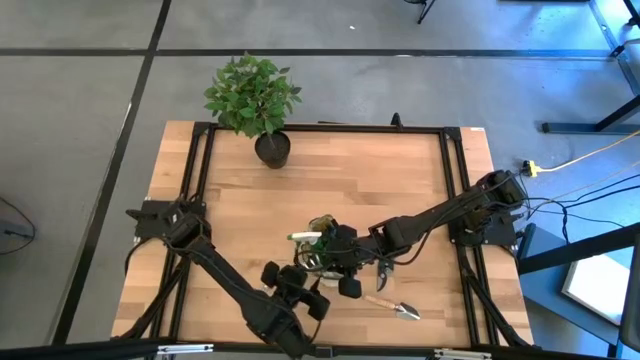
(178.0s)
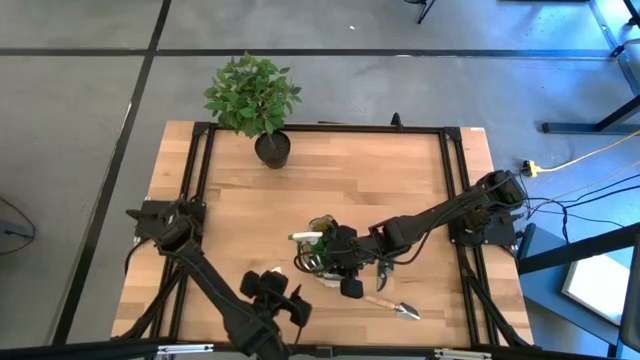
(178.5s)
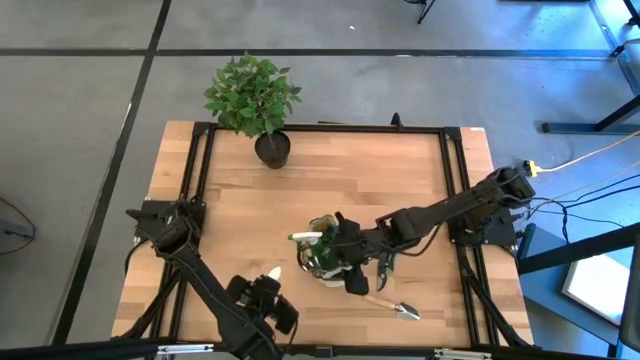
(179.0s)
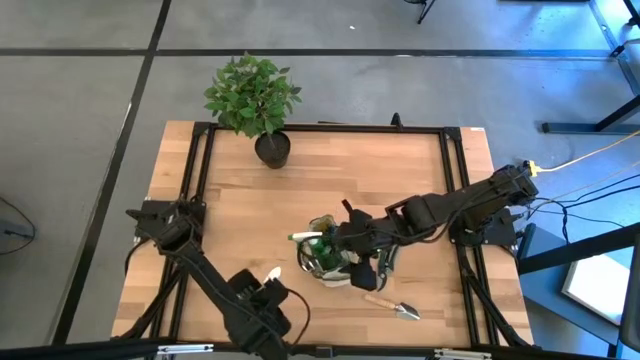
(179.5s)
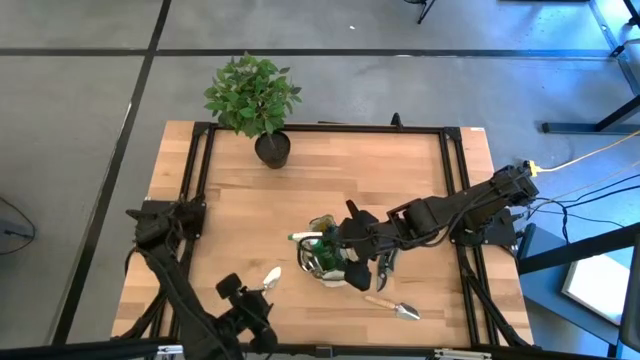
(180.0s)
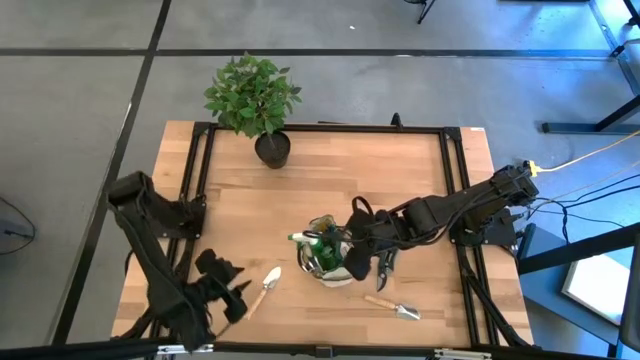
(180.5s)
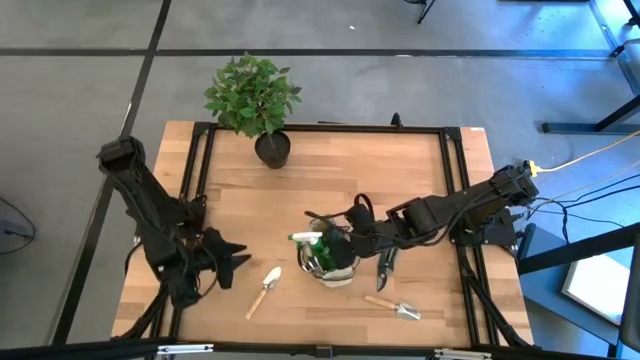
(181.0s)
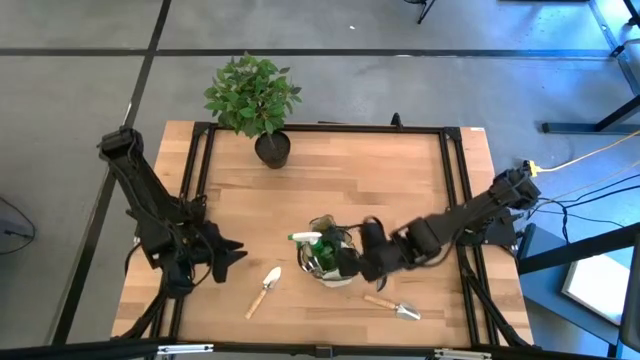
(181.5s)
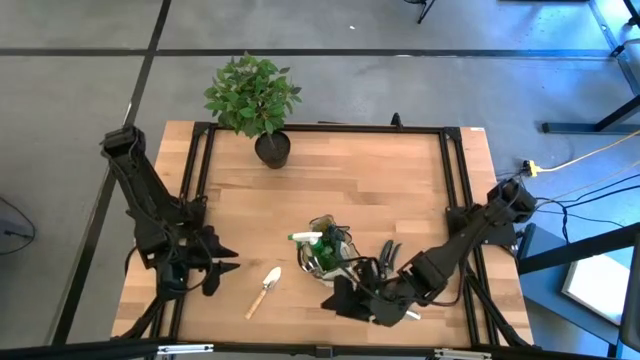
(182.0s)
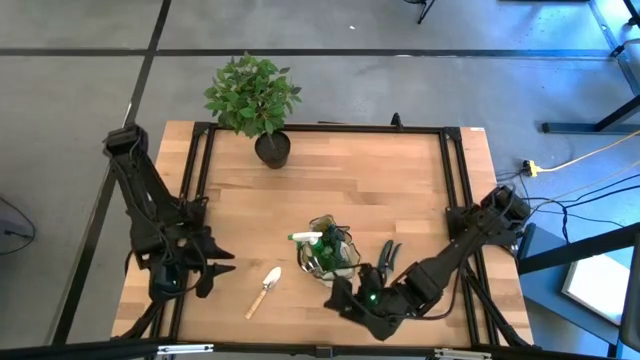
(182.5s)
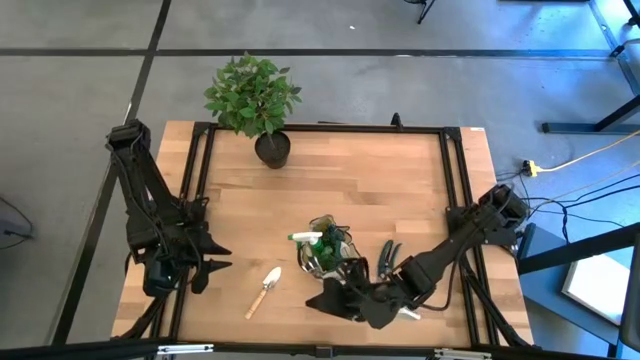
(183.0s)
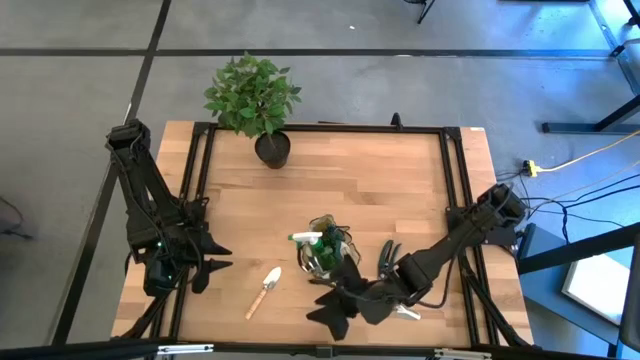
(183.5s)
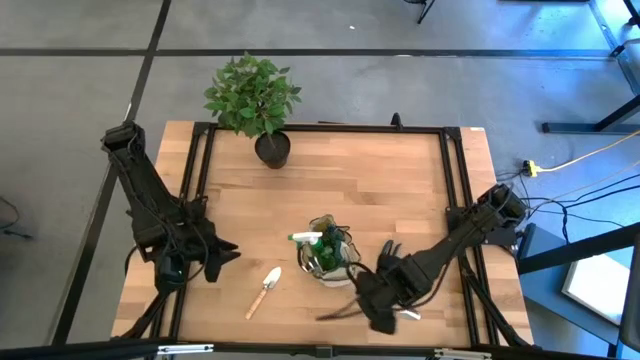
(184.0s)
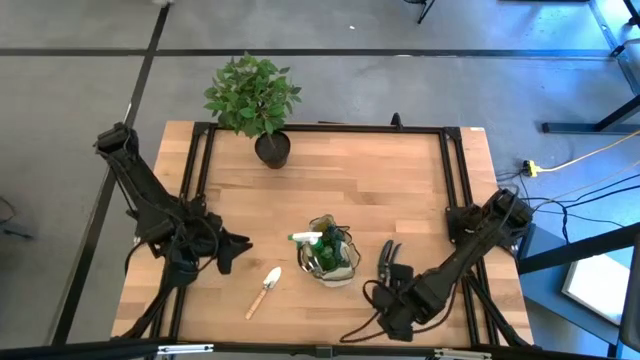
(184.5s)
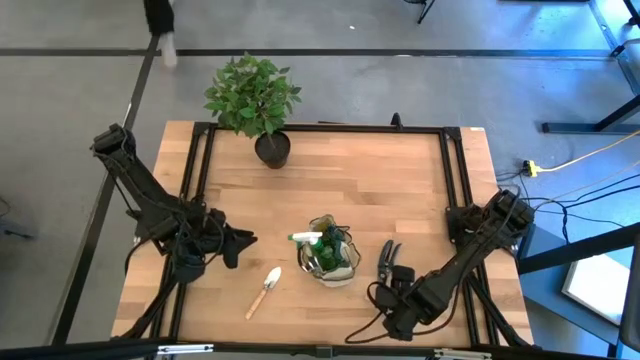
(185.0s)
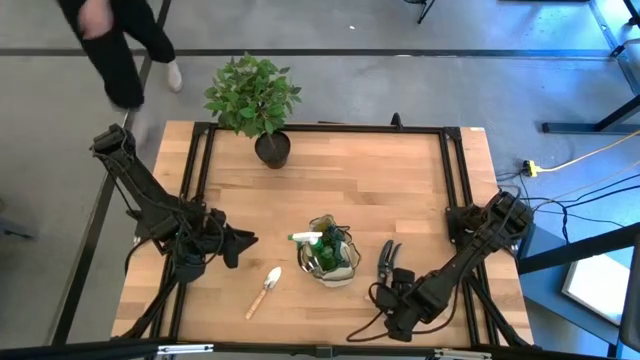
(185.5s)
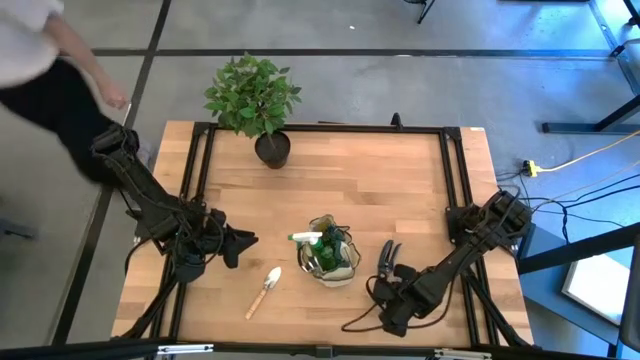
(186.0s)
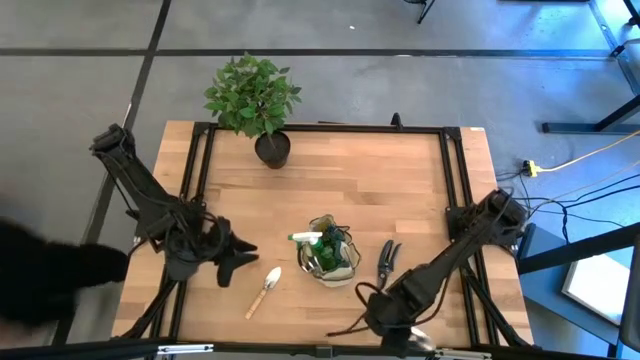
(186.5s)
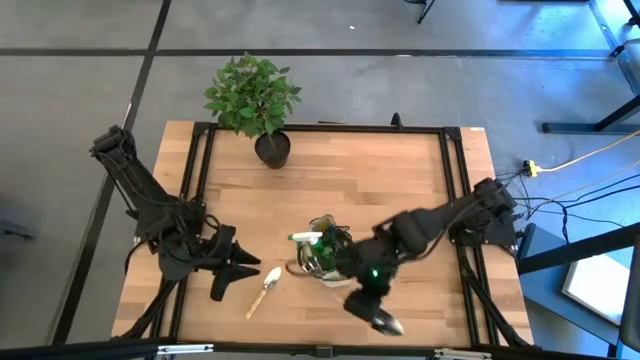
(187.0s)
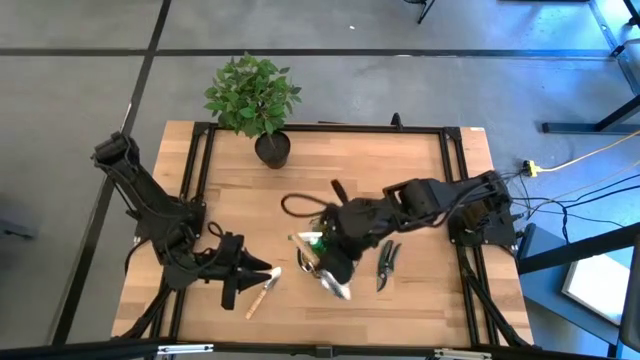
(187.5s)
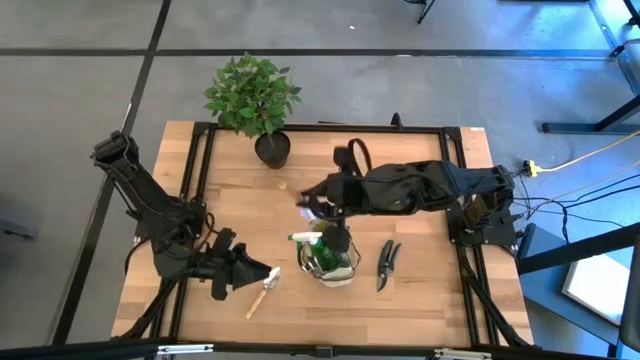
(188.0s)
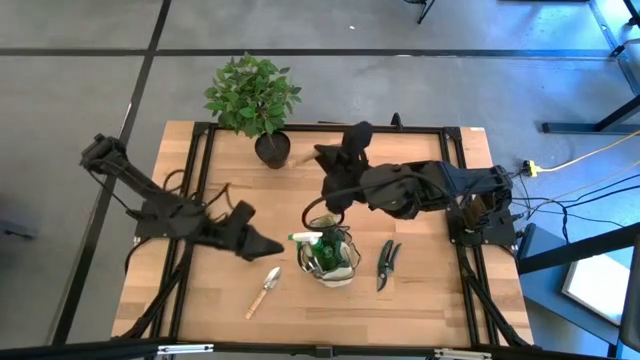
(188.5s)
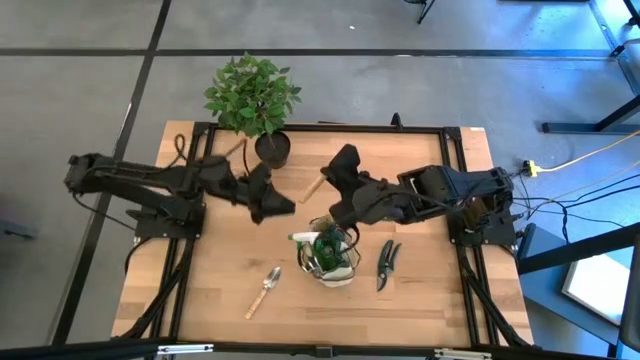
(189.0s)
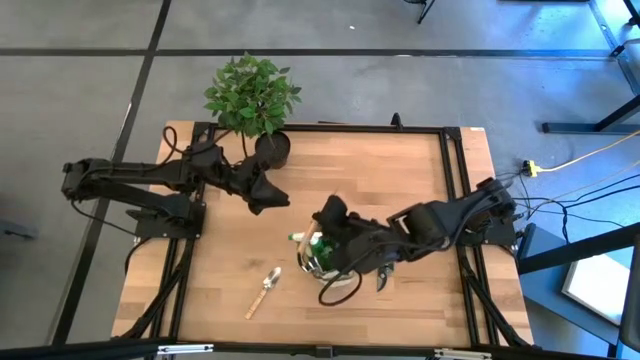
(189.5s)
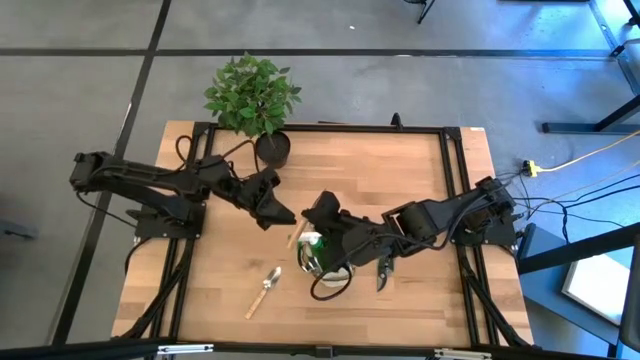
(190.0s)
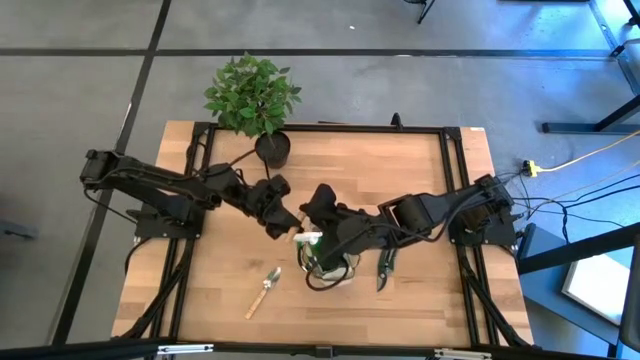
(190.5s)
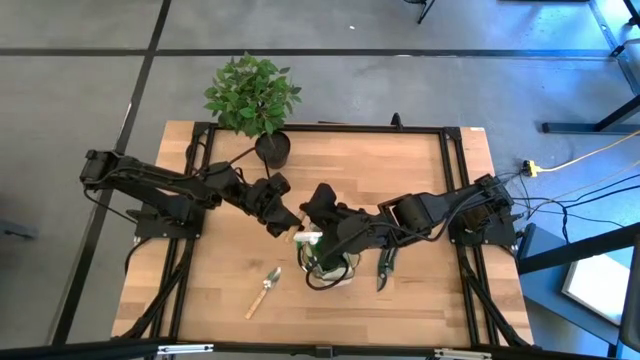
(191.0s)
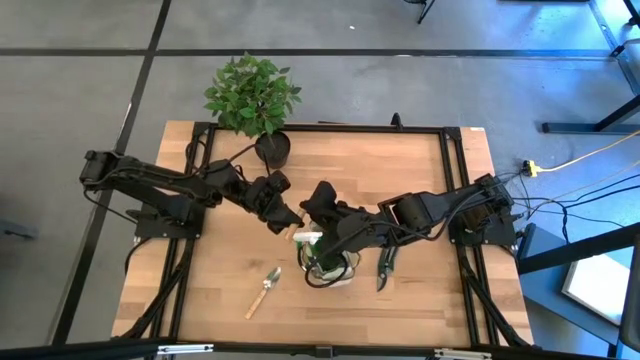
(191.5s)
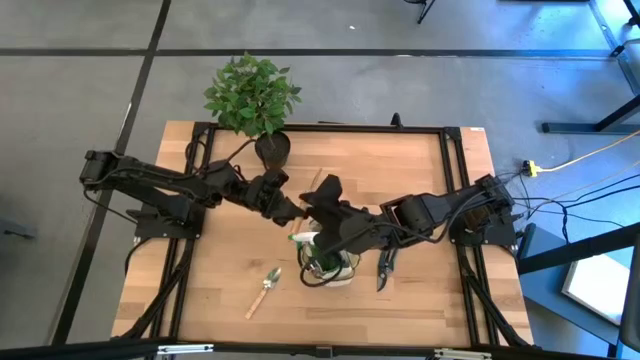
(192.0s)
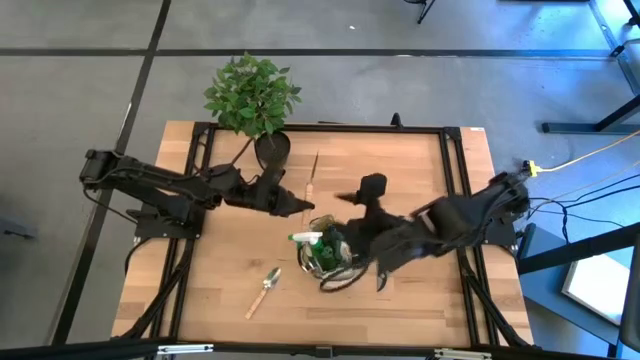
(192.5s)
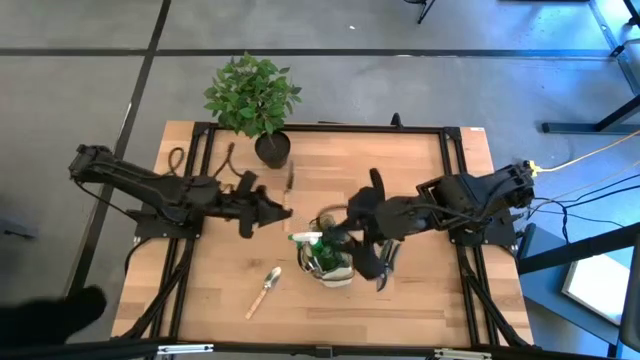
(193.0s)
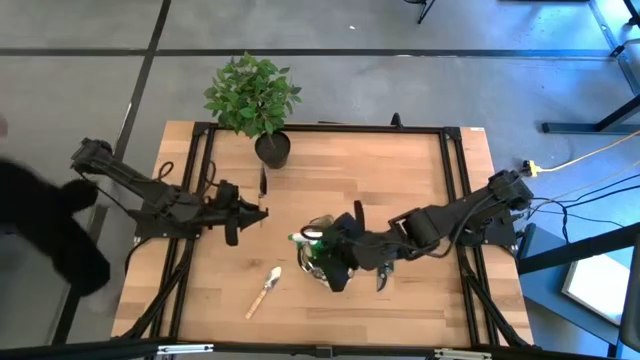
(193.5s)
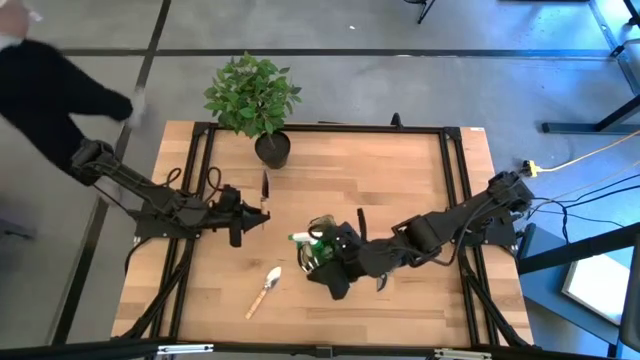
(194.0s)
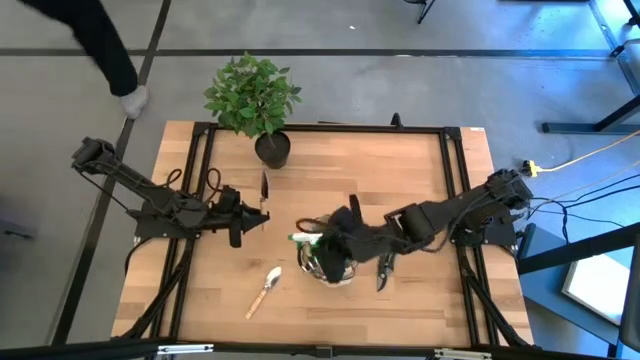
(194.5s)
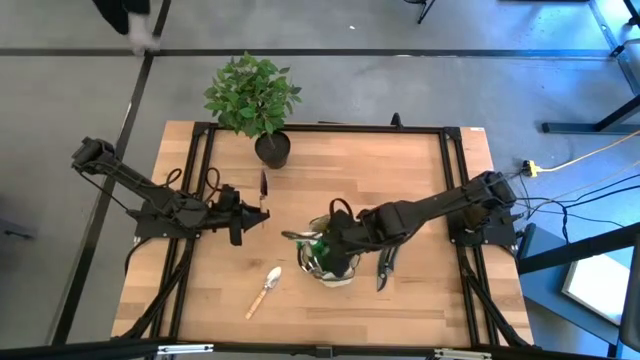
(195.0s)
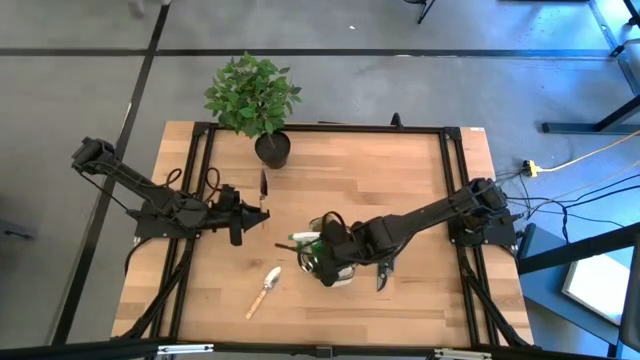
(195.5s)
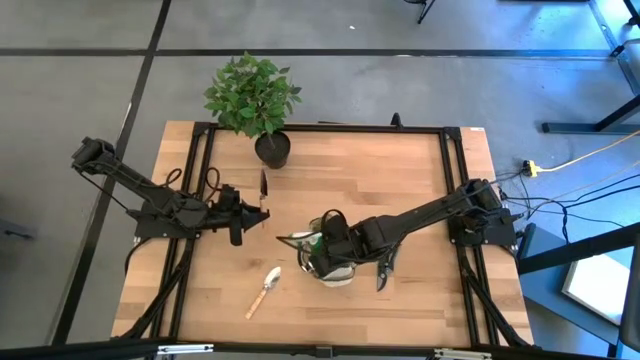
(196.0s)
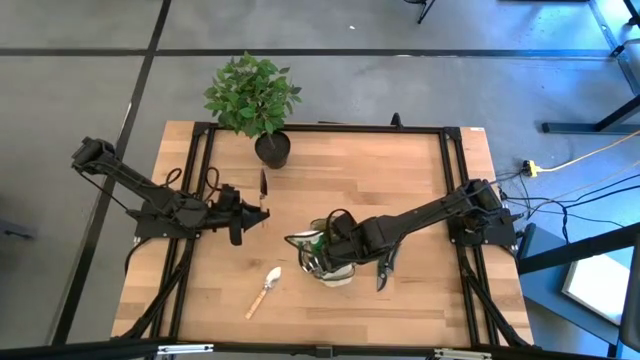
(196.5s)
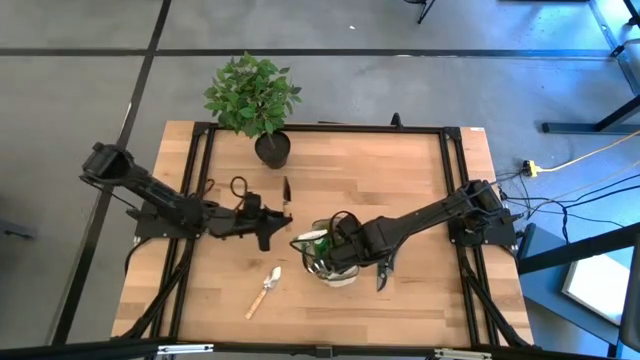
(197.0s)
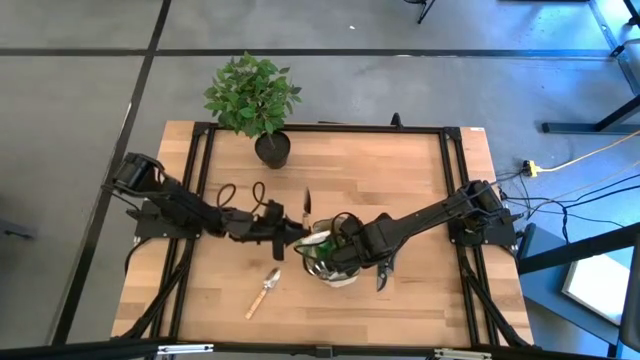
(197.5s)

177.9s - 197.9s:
Task: Pick & Place Garden tools in Gardening bag
Put the right brown trowel into the brown gardening bag

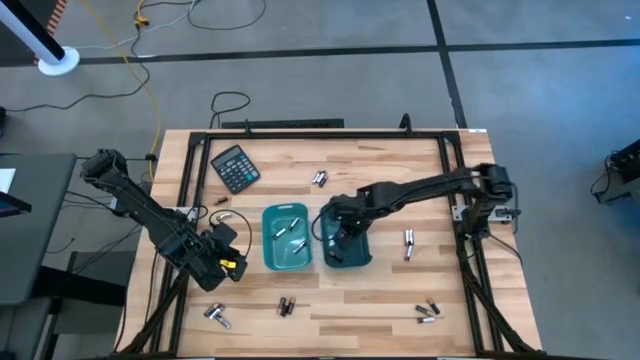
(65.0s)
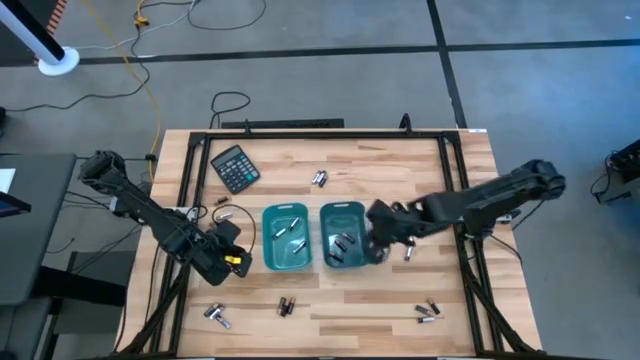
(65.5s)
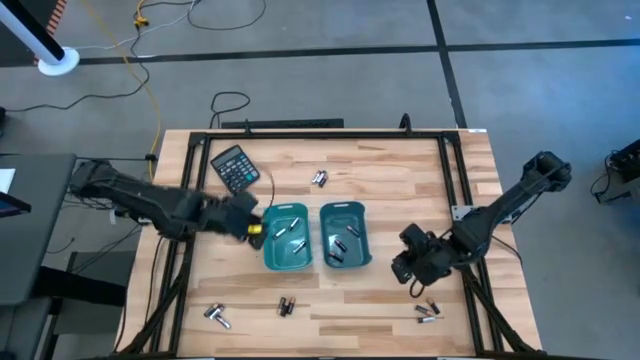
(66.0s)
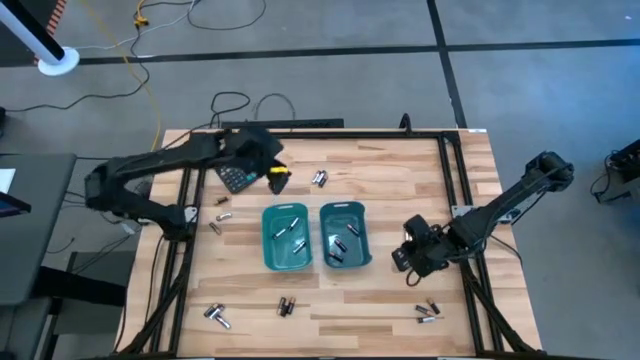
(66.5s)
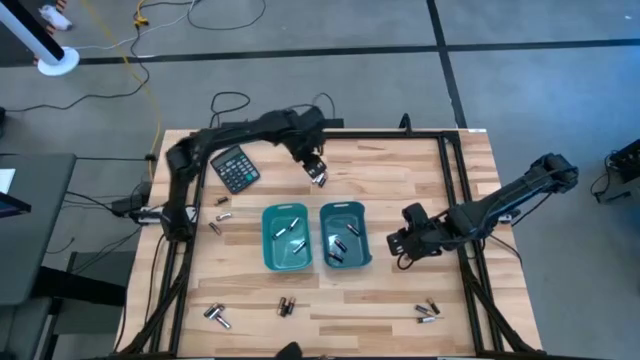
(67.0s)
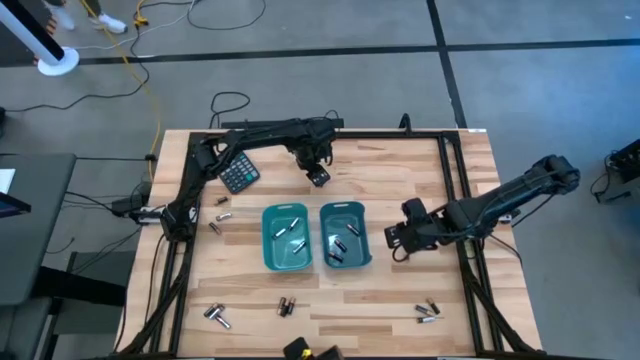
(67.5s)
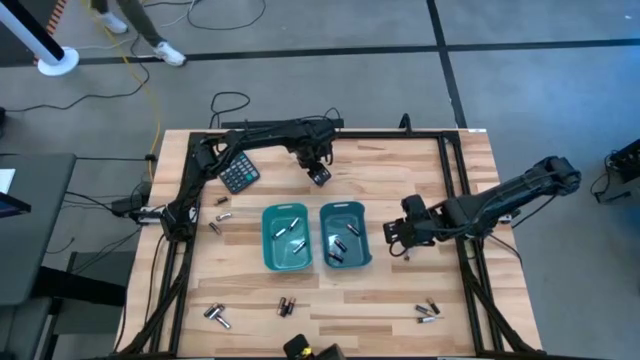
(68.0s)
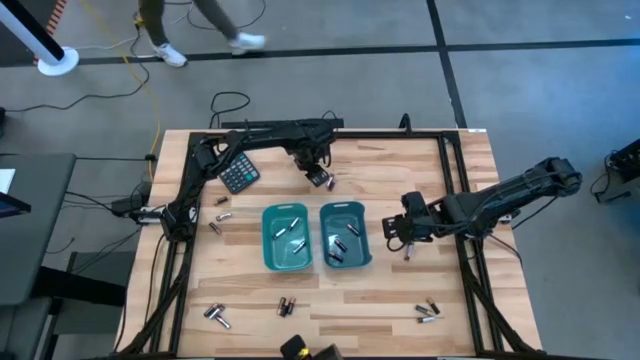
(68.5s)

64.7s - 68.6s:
Task: Sort batteries
Put the black battery into the blue bin
